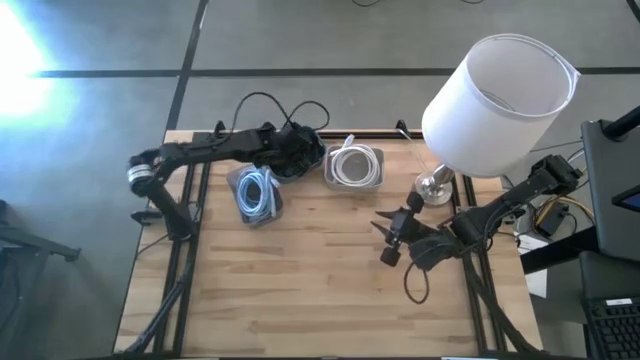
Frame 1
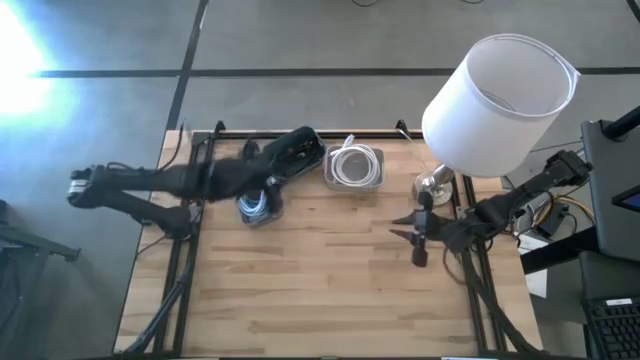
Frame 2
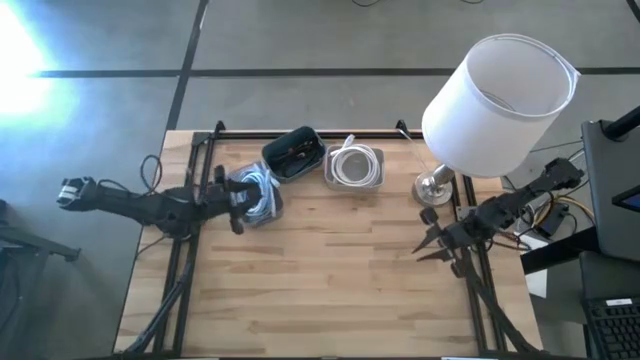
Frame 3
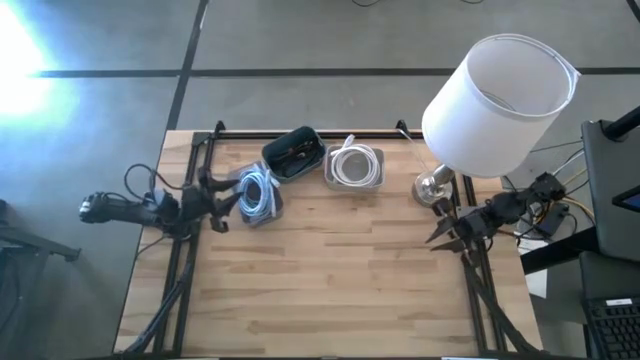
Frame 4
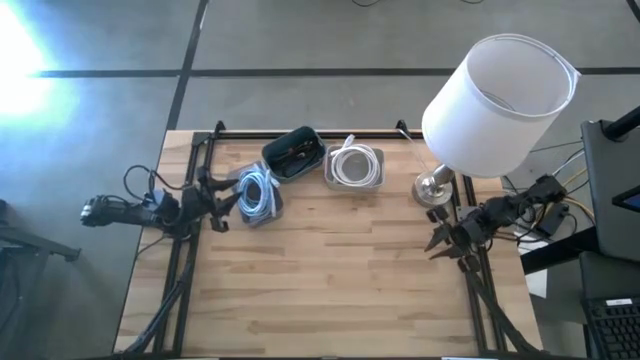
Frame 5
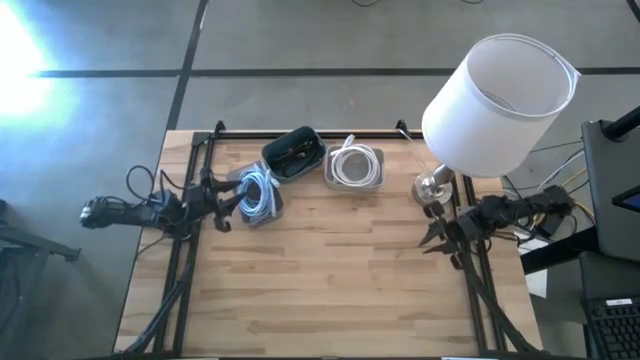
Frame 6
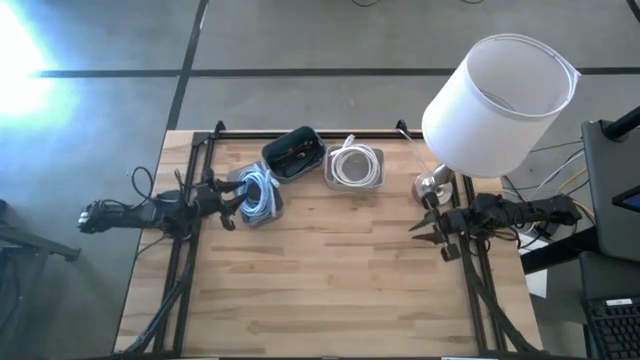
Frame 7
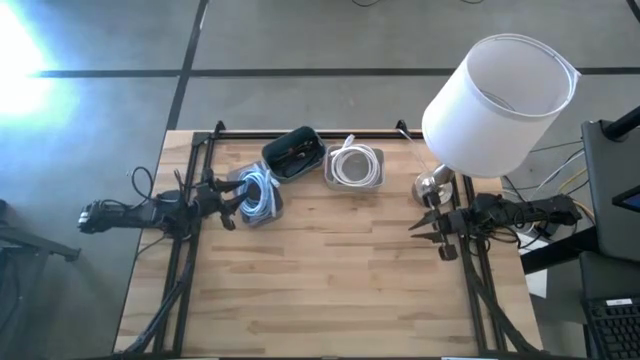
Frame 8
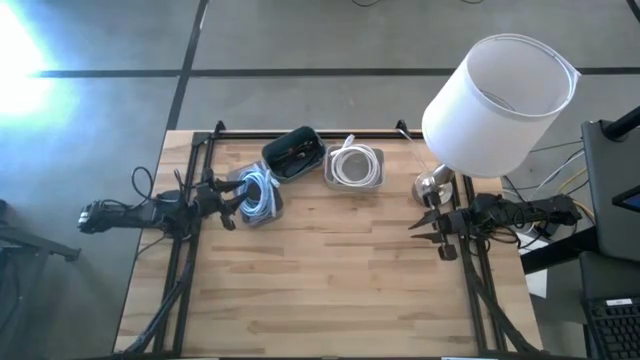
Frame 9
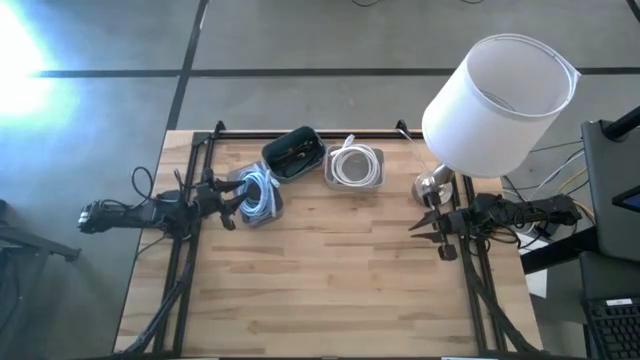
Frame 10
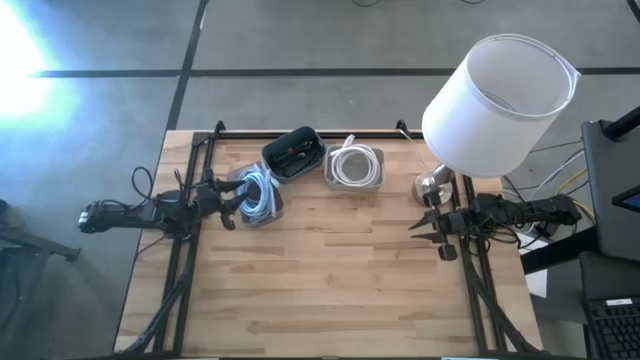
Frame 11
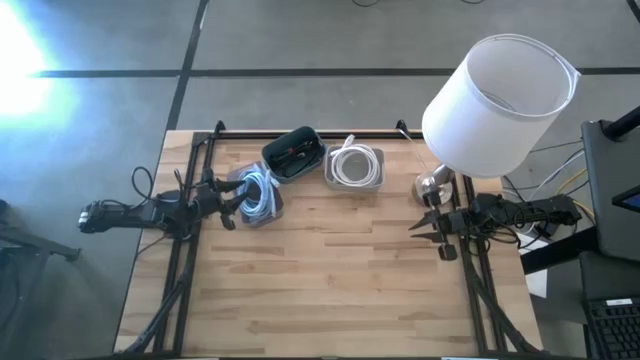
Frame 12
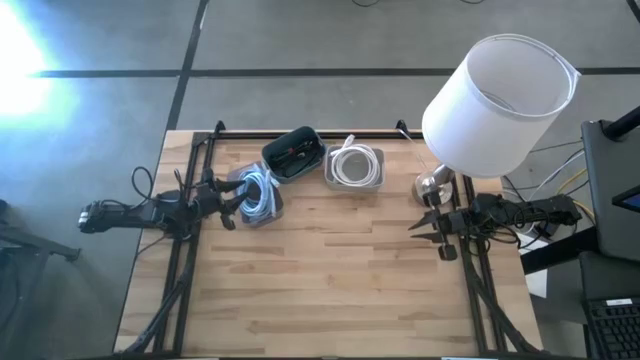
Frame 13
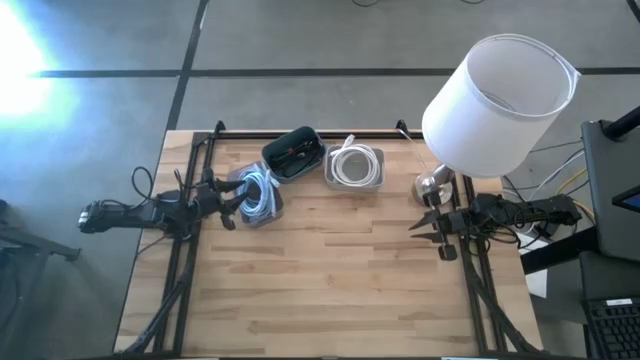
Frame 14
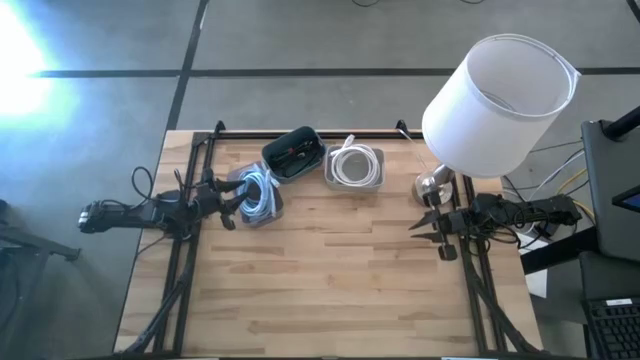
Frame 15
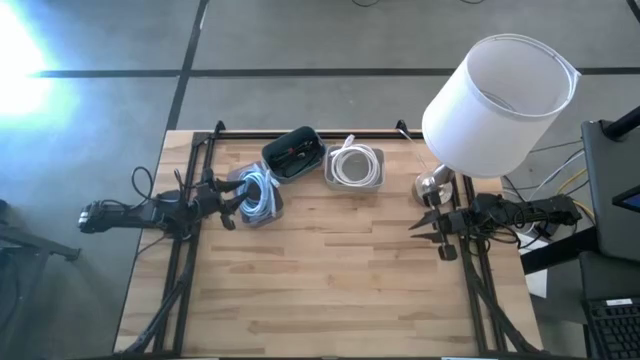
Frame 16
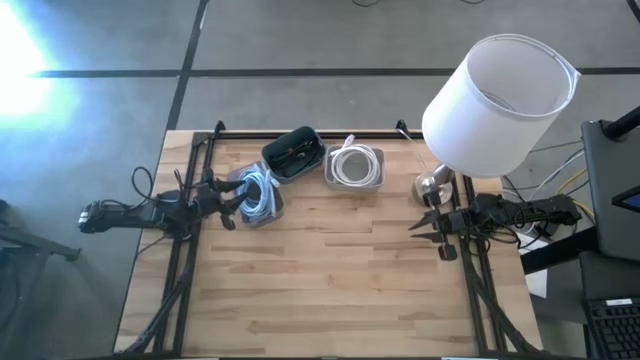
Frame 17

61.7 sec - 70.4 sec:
Task: Pick & Place USB Port
Return to Home Position

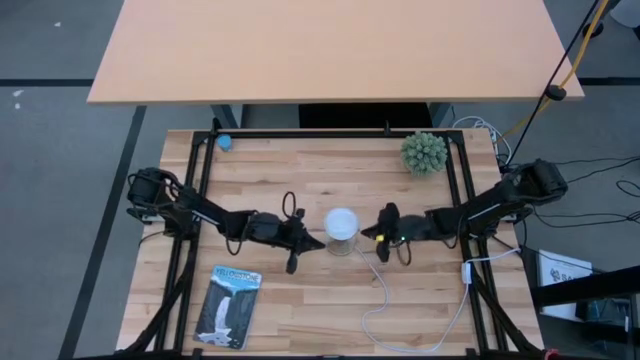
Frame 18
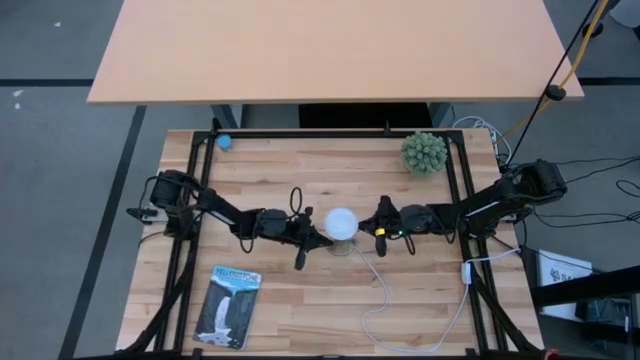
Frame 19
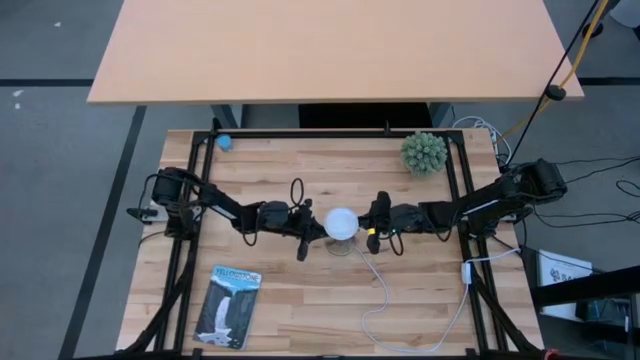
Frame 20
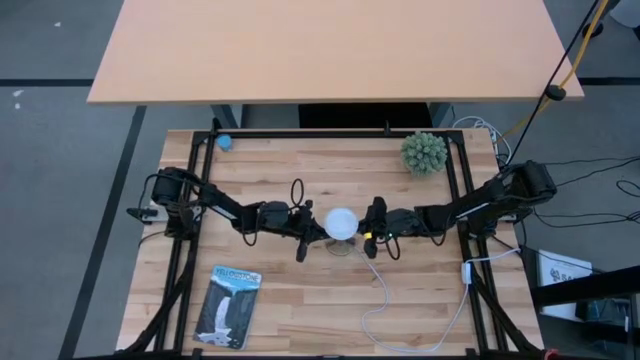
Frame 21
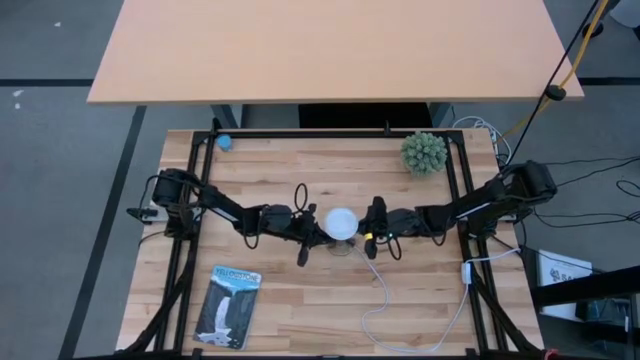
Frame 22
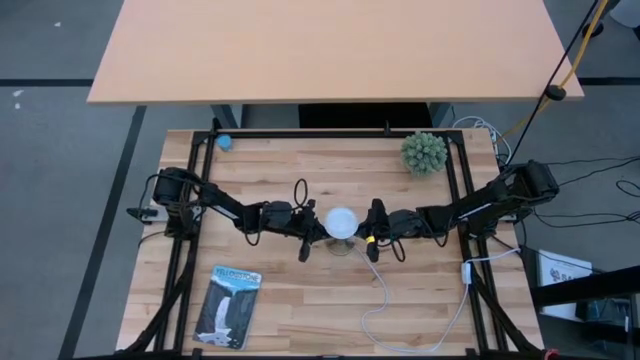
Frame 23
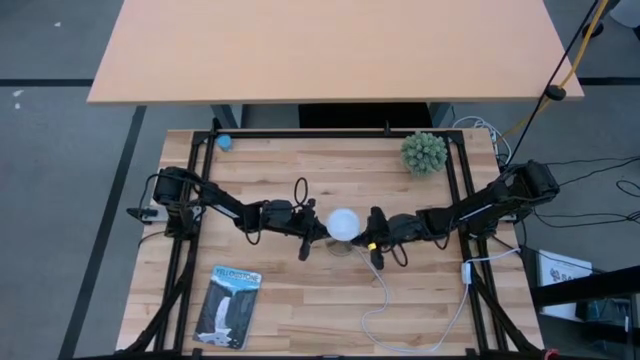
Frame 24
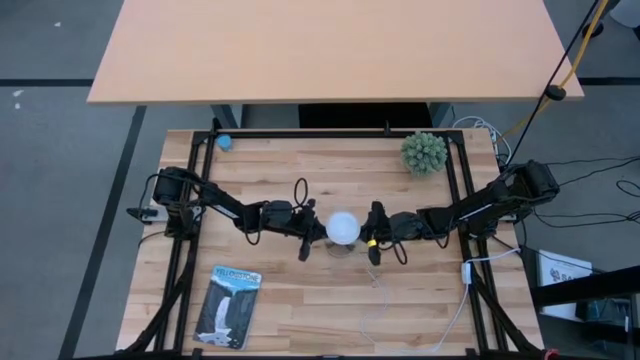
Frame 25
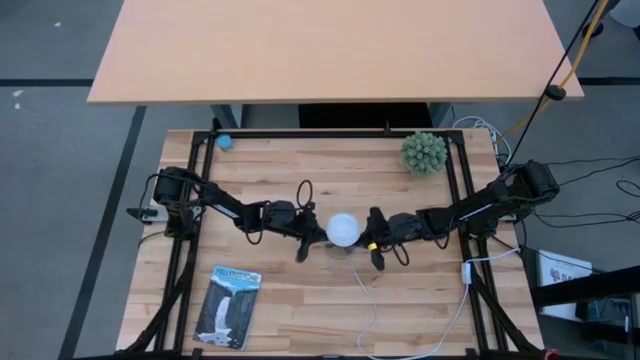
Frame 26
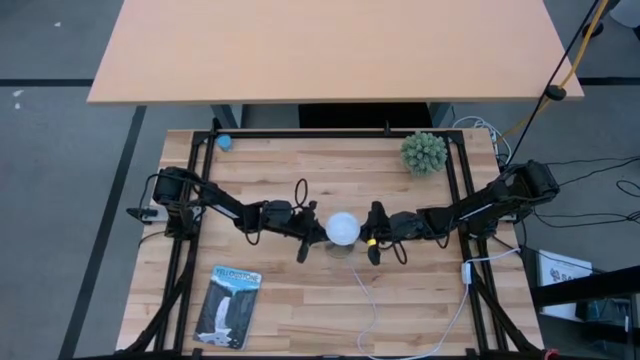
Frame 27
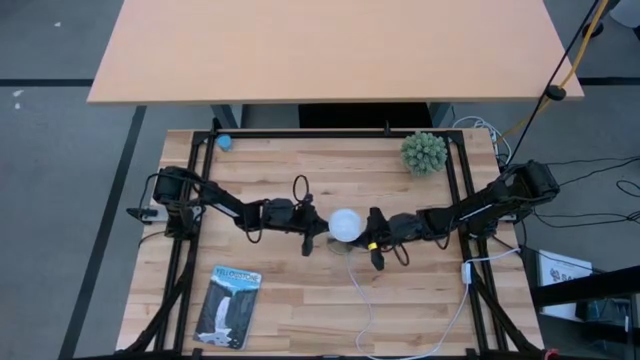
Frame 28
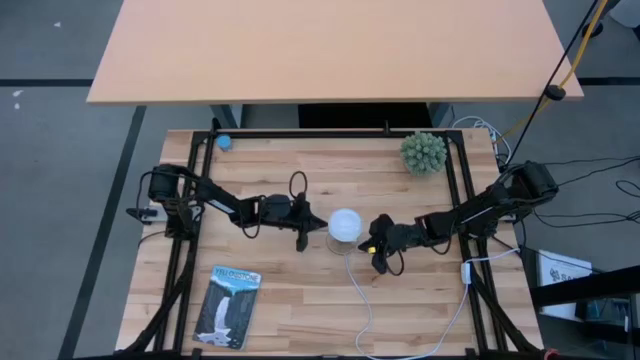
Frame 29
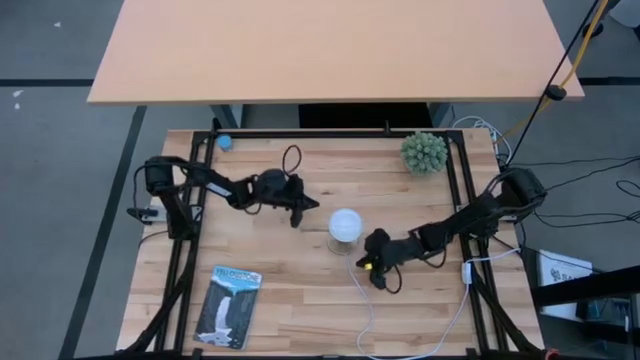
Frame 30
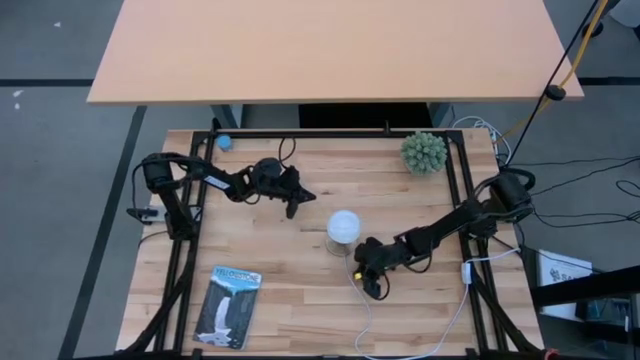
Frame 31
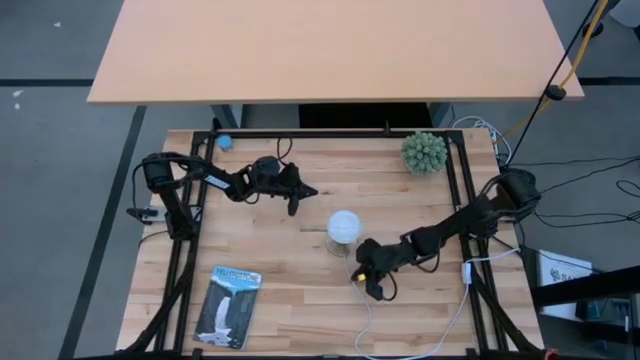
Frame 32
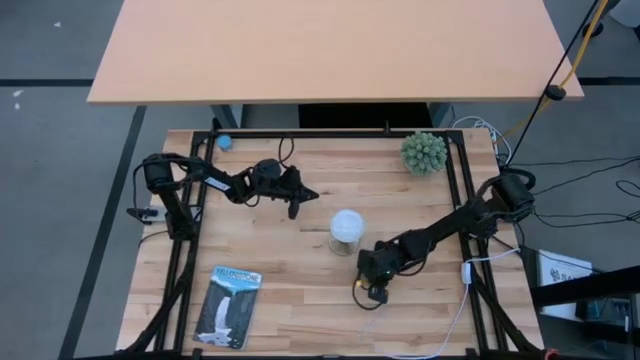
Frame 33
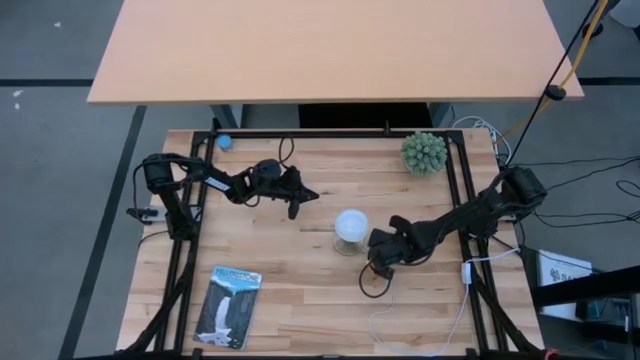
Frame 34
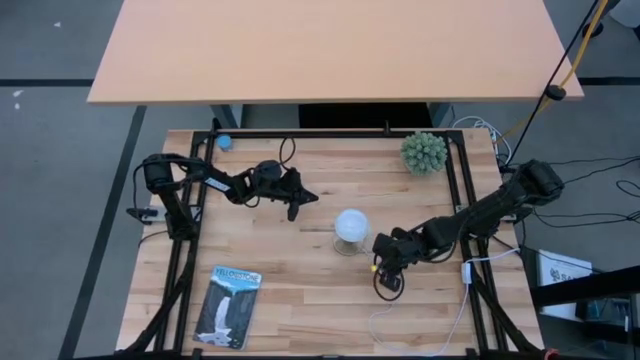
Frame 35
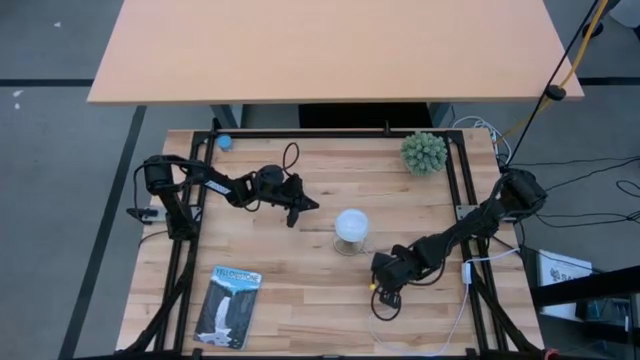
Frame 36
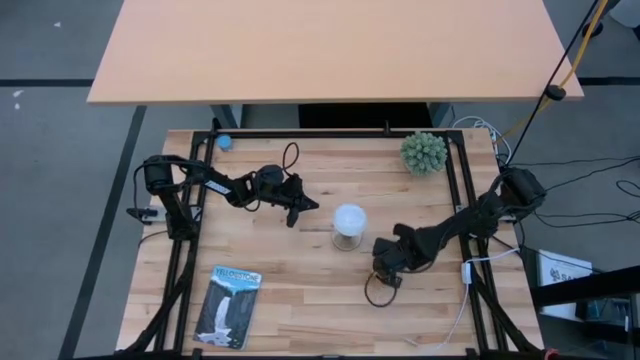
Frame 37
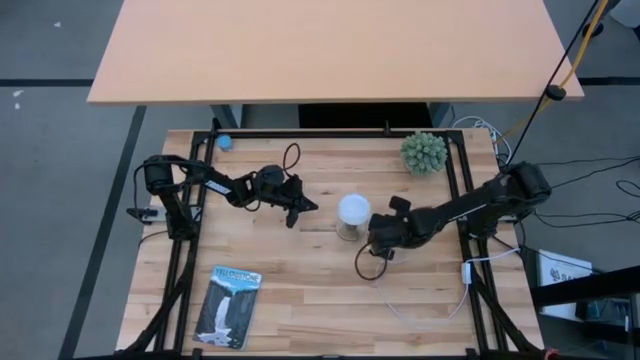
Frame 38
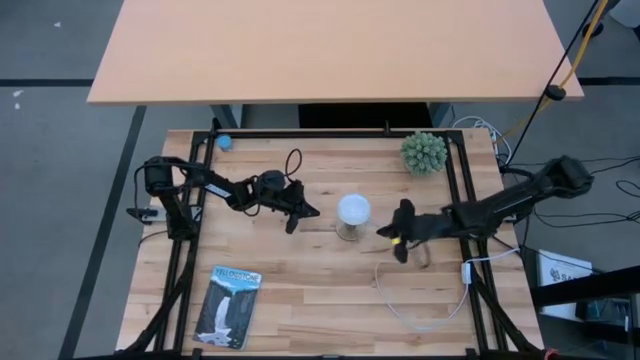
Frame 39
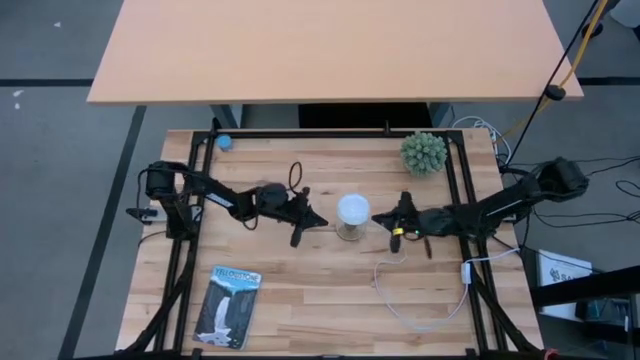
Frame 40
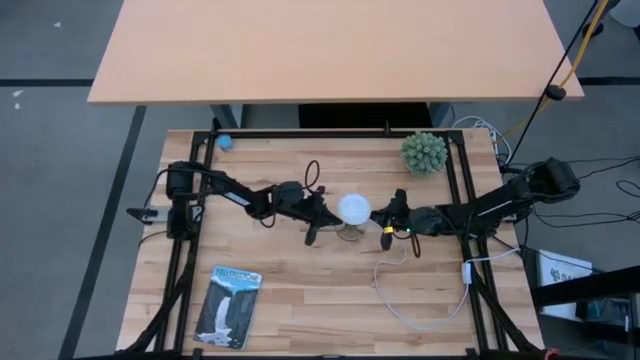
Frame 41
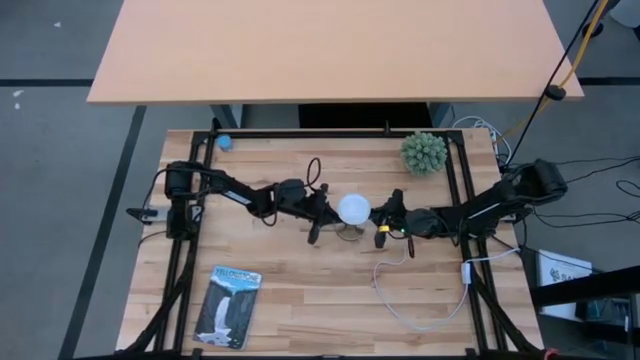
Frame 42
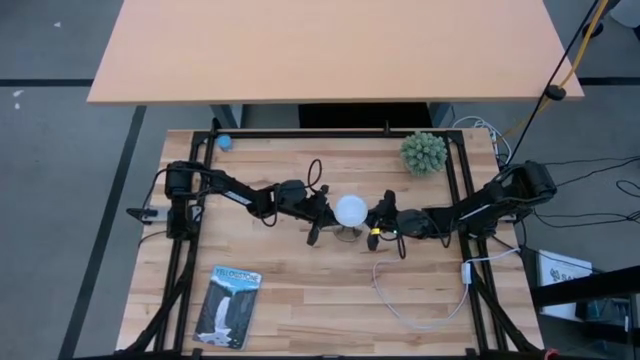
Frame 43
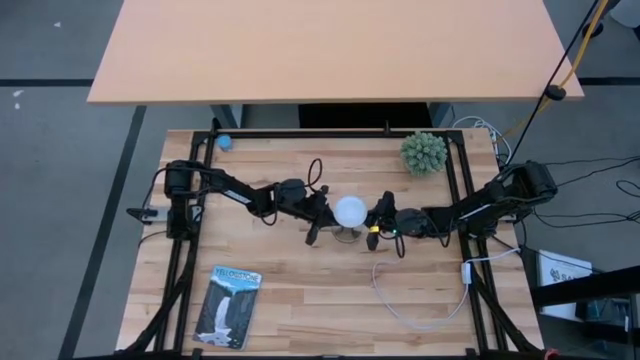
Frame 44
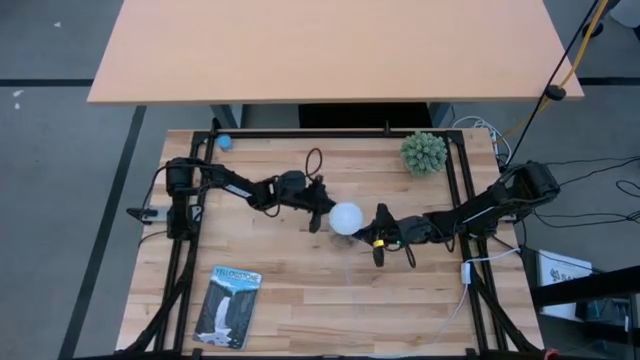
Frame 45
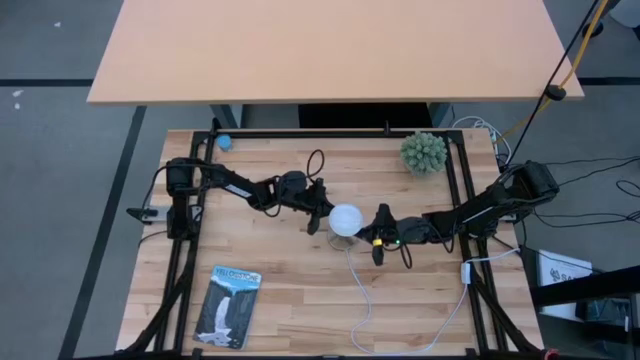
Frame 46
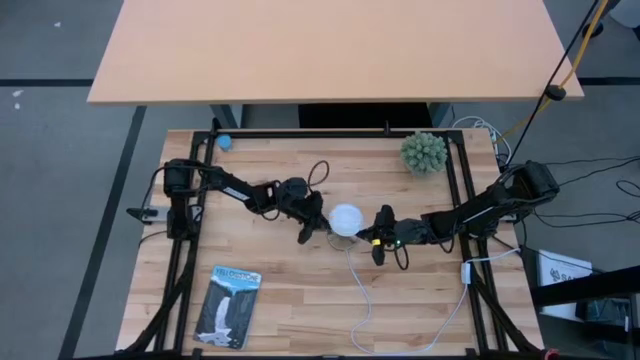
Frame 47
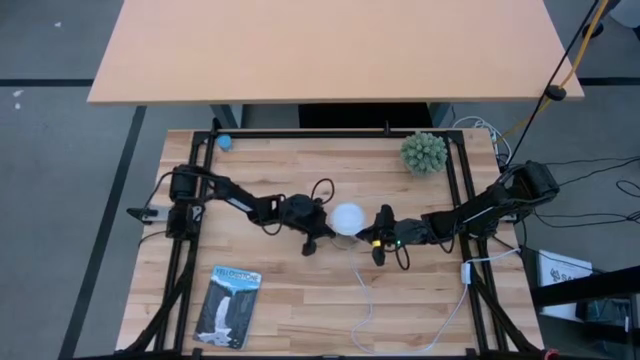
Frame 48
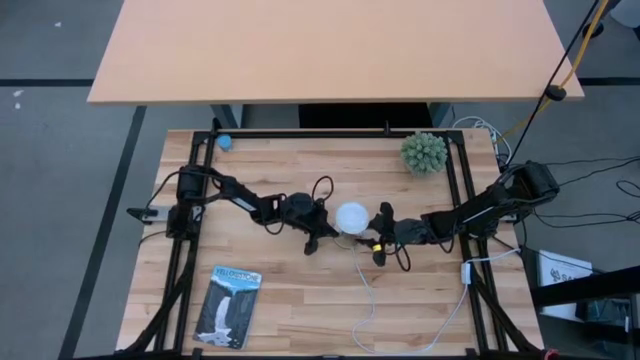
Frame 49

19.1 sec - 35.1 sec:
Task: Screw lightbulb
Insert the lightbulb into the lamp
